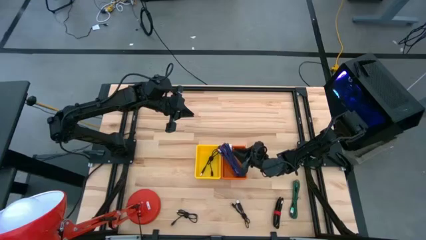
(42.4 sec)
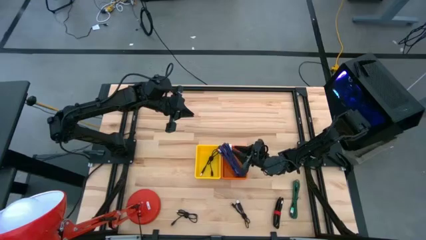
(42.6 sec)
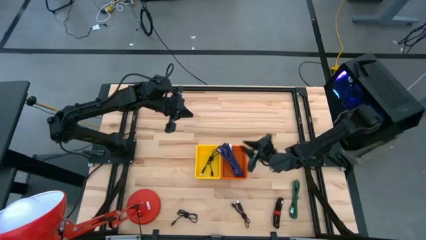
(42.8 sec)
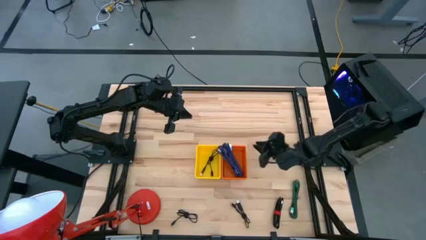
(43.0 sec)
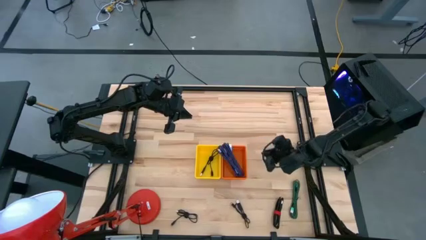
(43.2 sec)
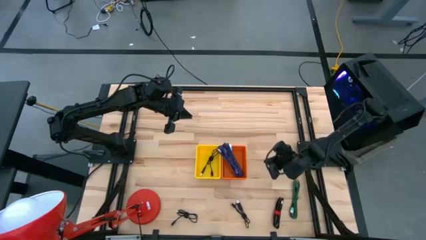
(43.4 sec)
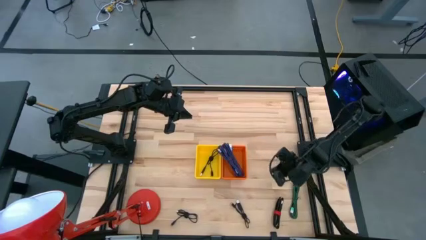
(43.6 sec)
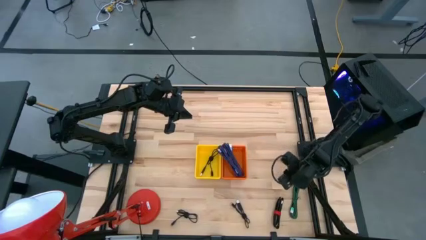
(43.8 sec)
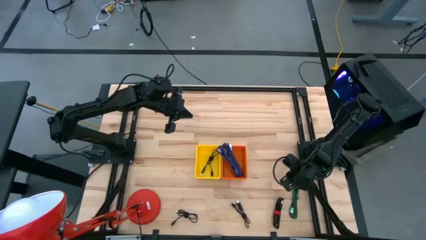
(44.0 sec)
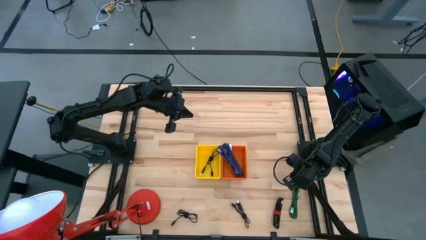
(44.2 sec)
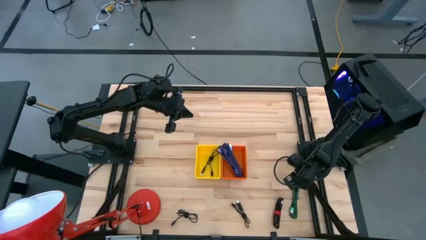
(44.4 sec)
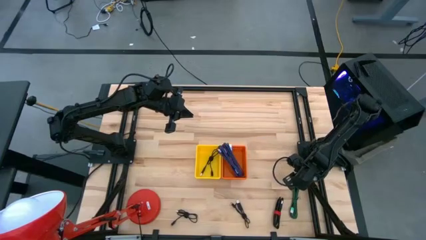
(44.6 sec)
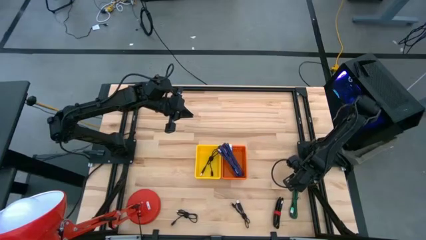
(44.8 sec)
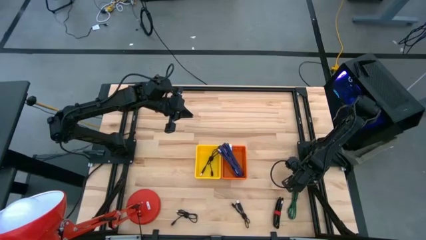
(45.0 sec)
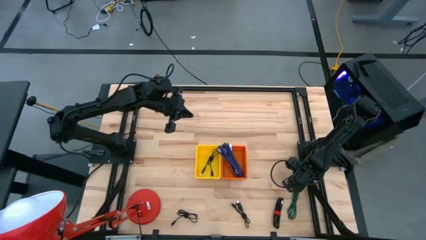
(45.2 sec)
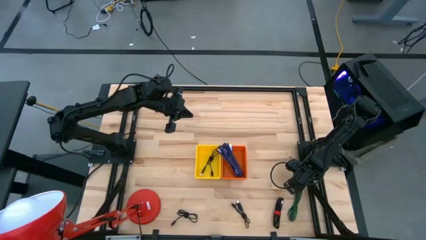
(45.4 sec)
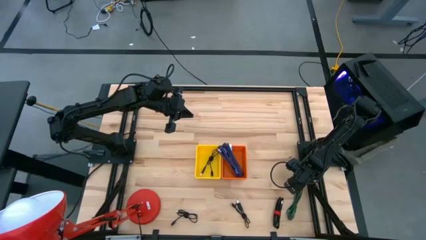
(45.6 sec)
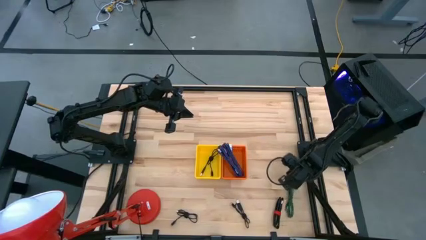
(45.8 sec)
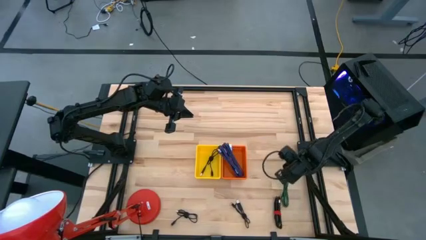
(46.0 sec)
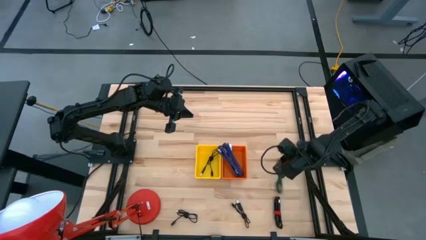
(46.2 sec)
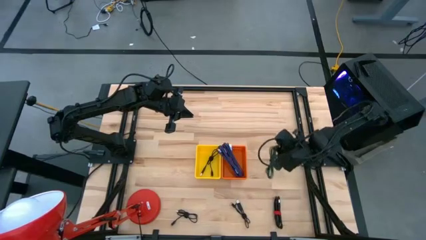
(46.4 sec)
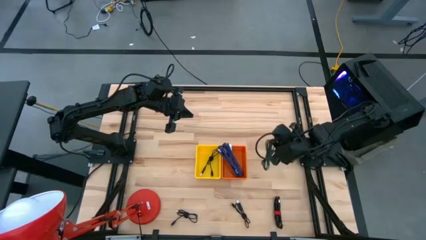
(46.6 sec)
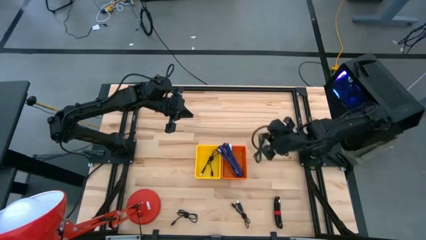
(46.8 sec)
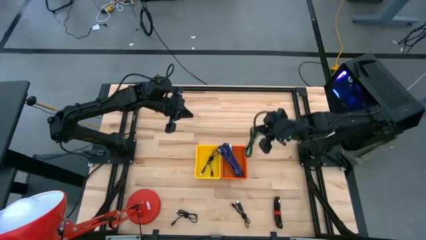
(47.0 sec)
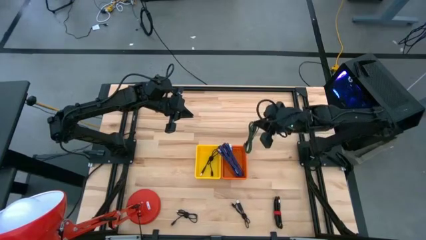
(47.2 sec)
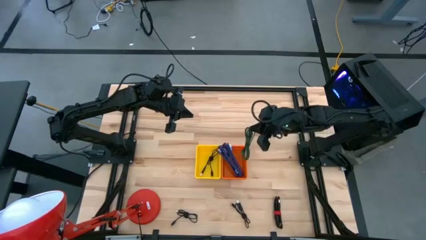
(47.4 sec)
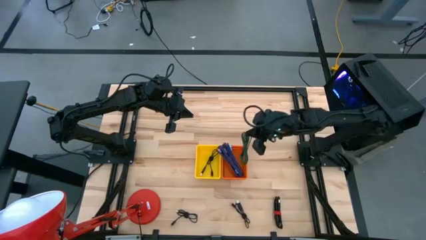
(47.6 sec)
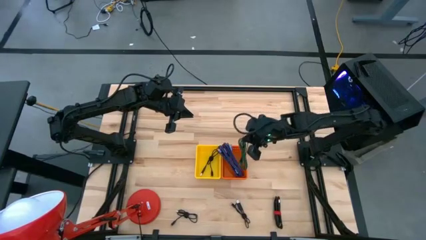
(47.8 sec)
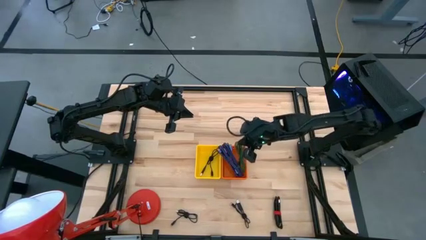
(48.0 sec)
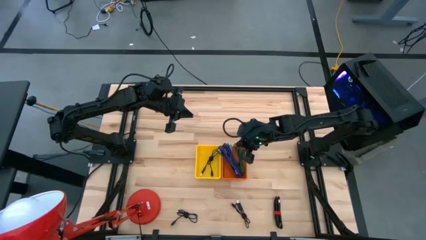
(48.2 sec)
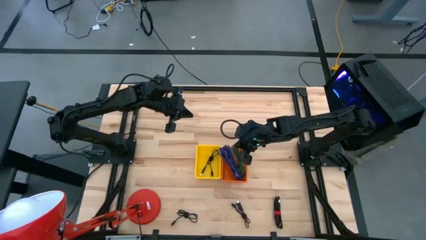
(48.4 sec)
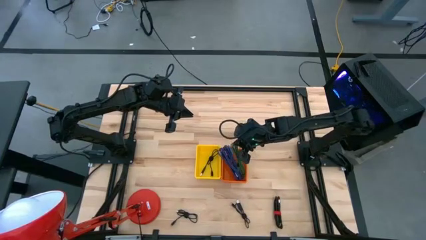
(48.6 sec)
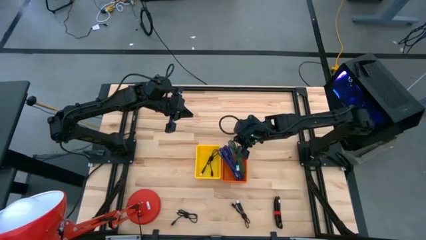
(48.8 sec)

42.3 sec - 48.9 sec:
Task: Pick & Place USB Port
Put the green patterned charger cable into the orange bin

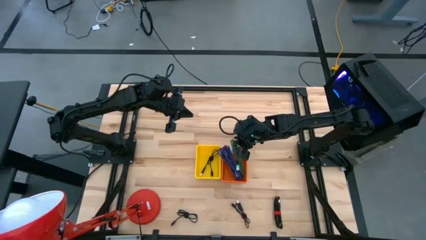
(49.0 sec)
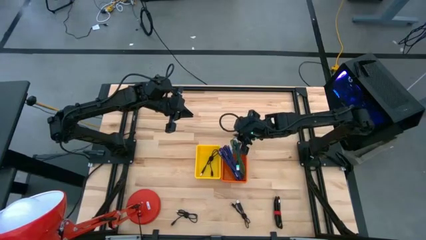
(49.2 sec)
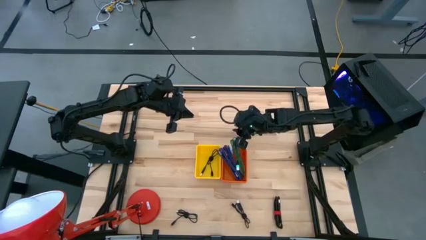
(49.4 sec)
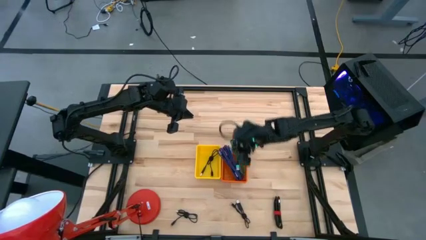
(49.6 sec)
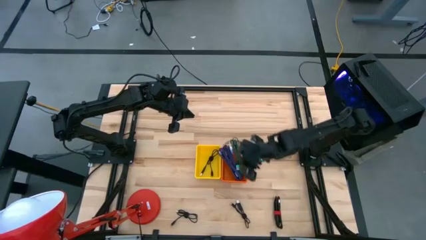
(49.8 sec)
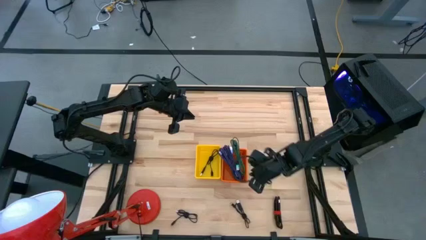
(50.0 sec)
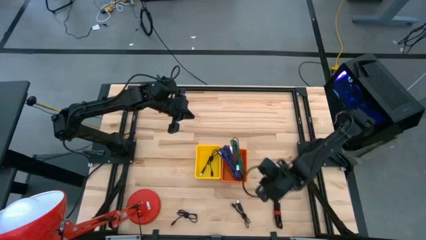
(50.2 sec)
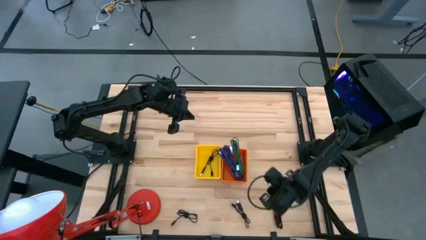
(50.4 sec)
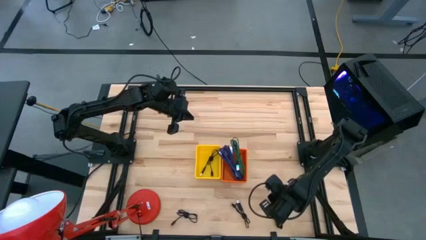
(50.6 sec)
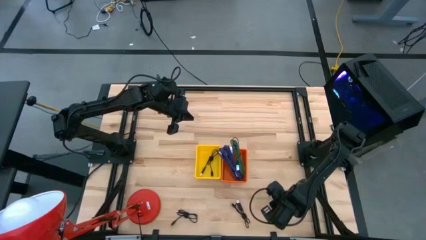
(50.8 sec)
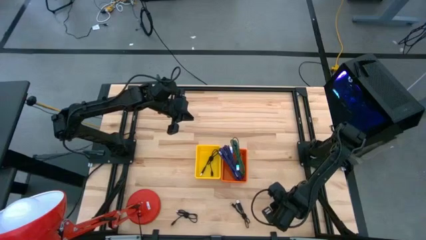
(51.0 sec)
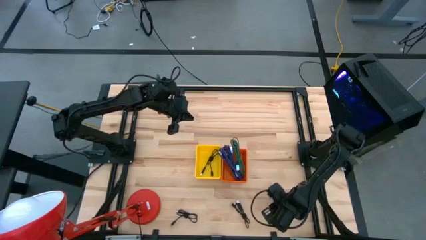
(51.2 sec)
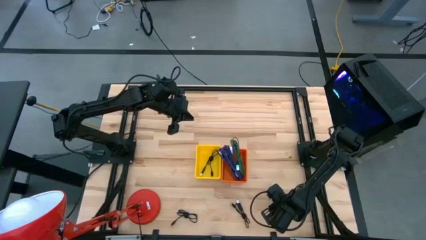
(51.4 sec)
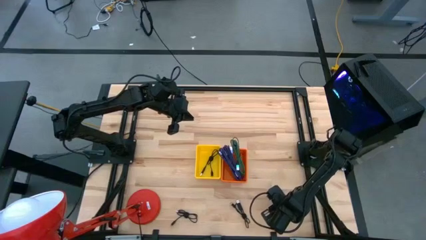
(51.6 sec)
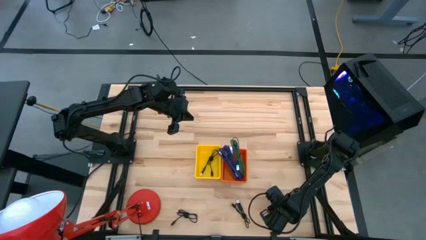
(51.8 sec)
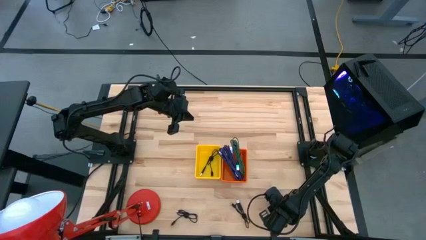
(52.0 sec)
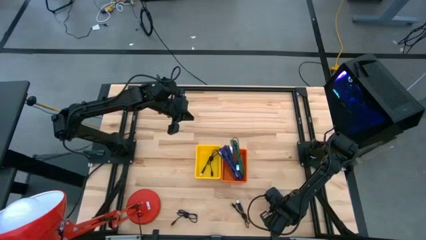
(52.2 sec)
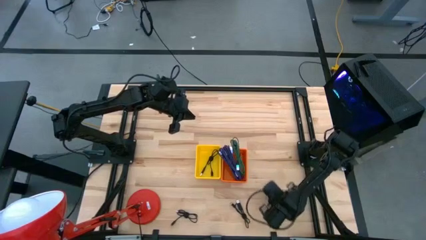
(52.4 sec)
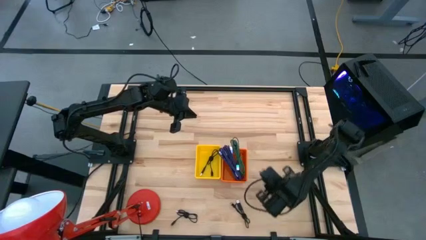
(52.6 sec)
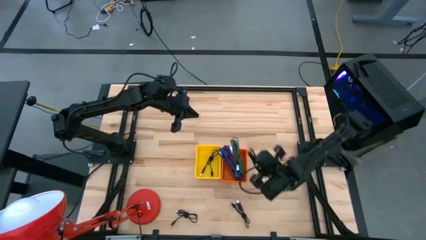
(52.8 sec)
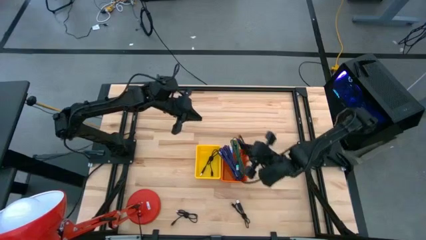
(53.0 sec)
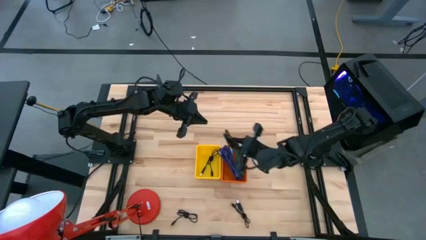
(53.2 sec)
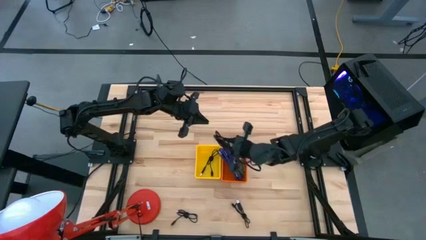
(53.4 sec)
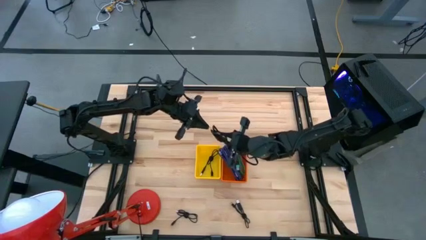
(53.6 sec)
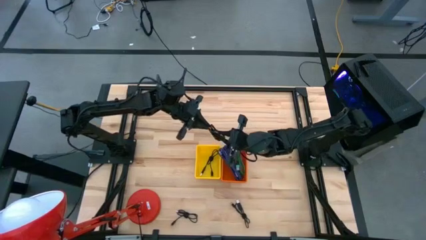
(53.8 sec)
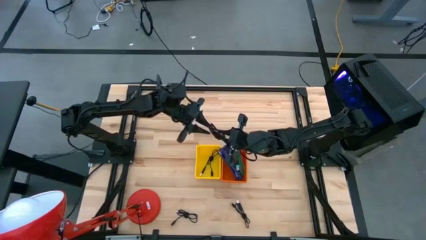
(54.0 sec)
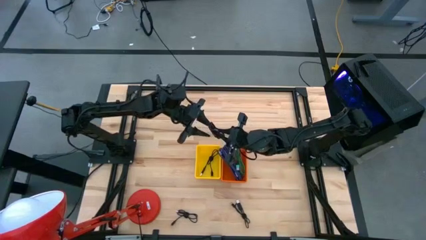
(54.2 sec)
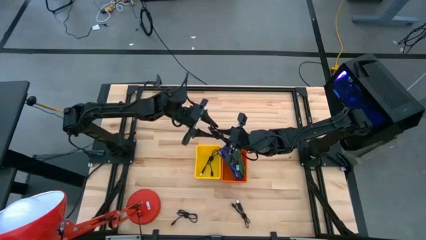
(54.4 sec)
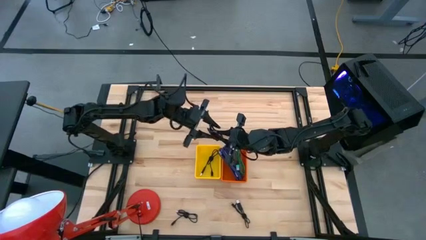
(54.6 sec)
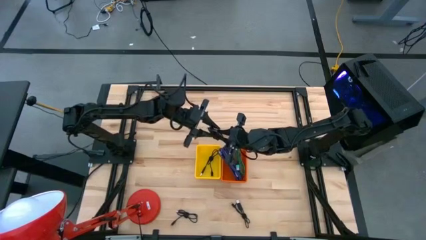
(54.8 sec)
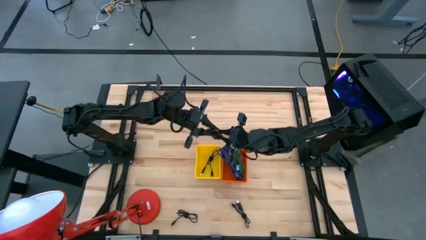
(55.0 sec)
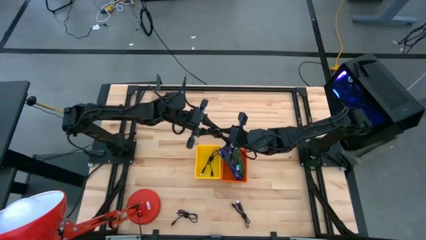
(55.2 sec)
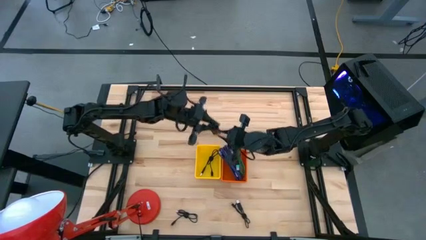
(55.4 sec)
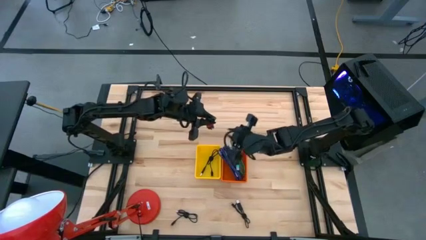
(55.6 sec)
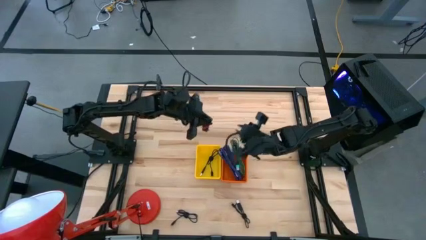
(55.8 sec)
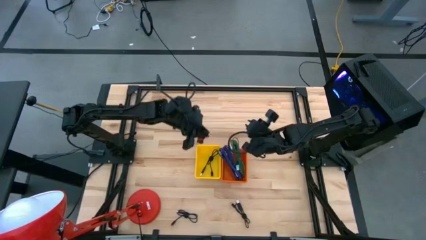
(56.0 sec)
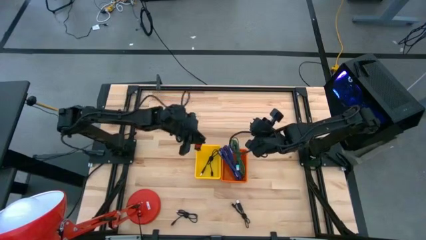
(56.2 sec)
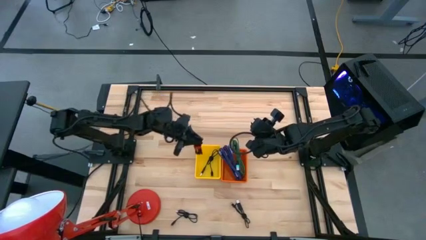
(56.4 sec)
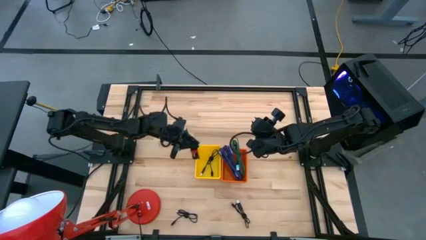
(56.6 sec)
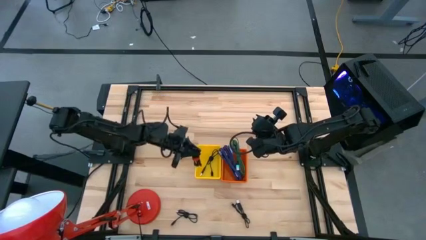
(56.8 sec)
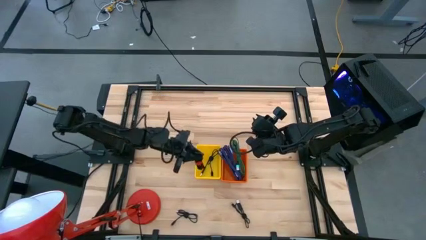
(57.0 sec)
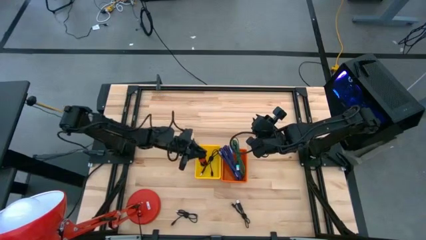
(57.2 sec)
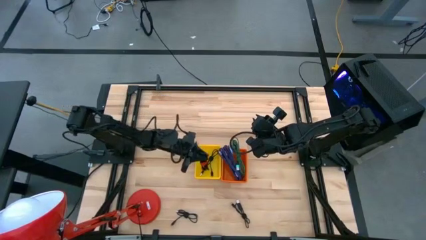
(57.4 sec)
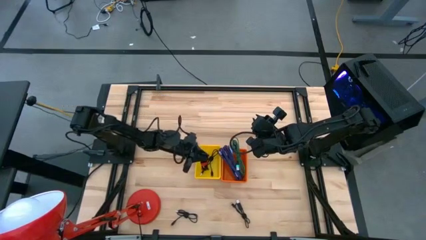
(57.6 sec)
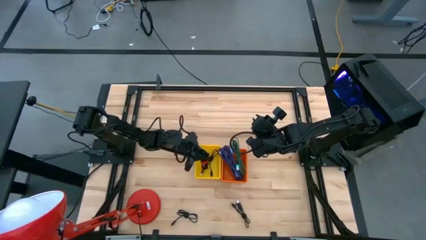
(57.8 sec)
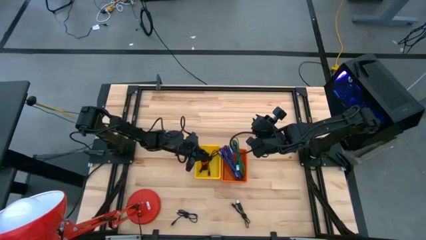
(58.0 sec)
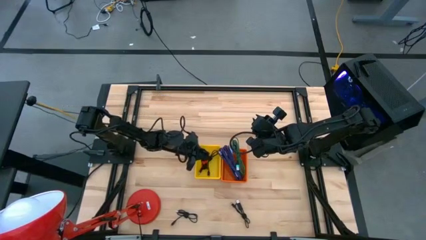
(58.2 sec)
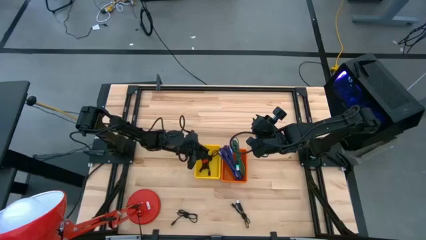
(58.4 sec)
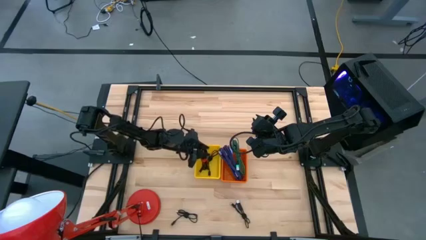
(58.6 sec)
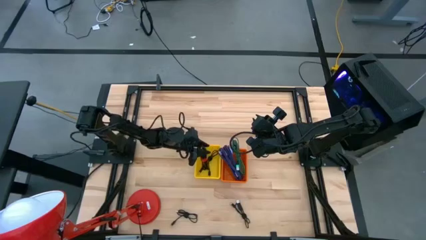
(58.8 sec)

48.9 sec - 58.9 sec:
Put the right black charger cable into the yellow bin
